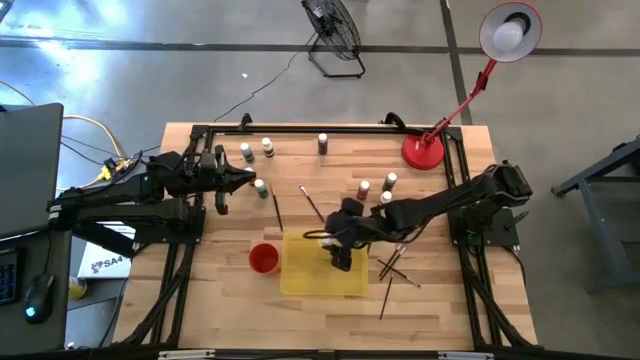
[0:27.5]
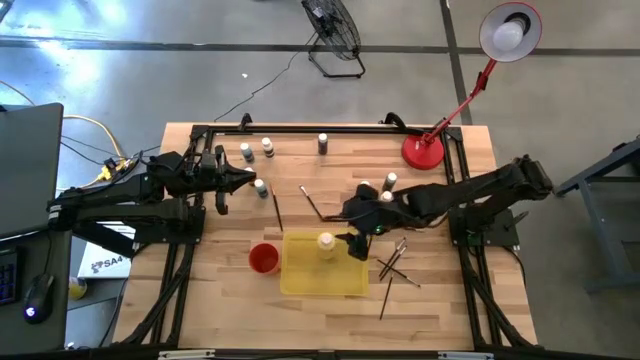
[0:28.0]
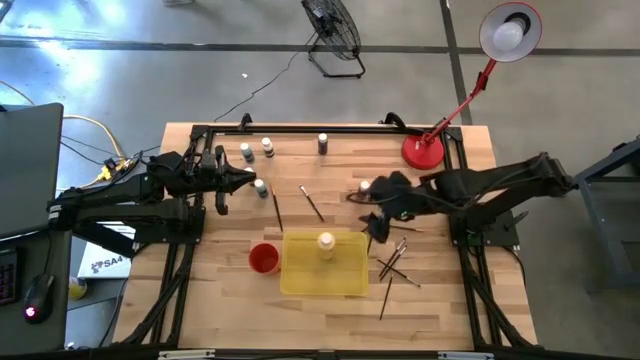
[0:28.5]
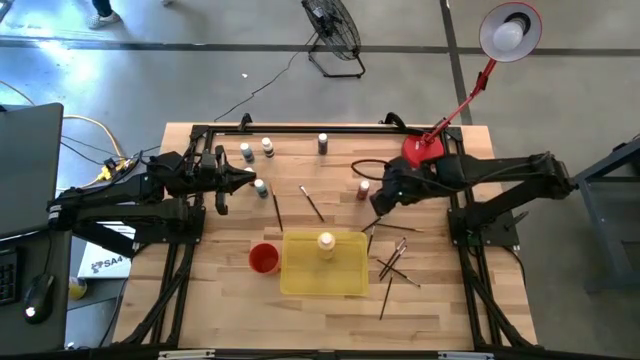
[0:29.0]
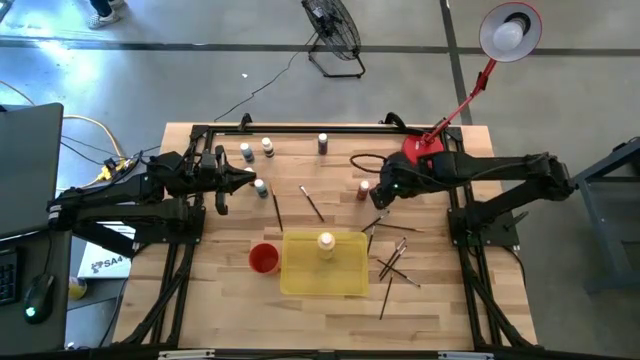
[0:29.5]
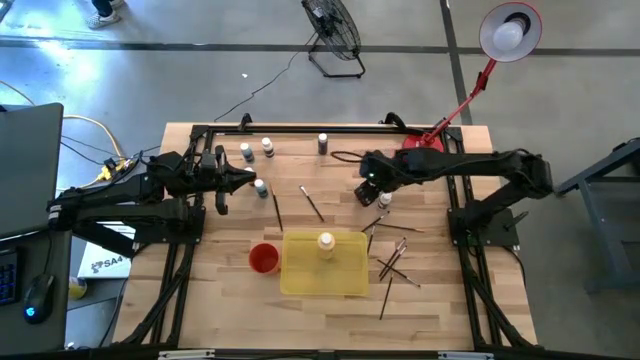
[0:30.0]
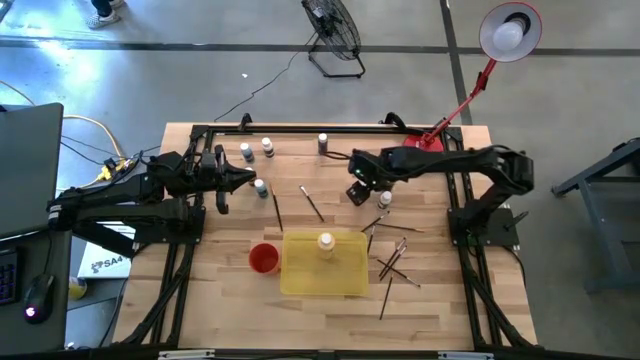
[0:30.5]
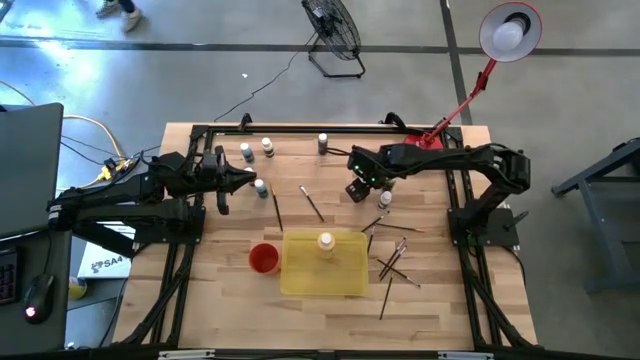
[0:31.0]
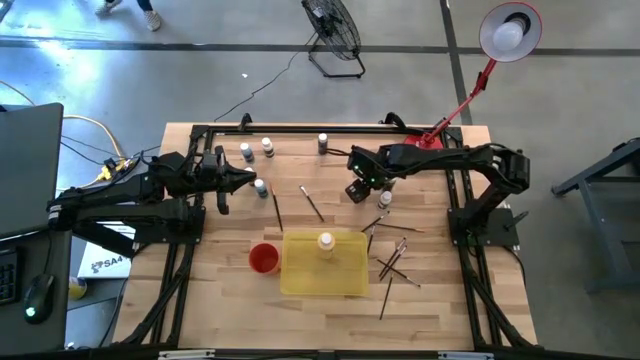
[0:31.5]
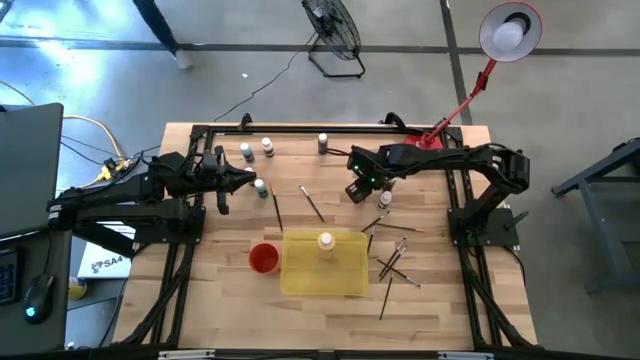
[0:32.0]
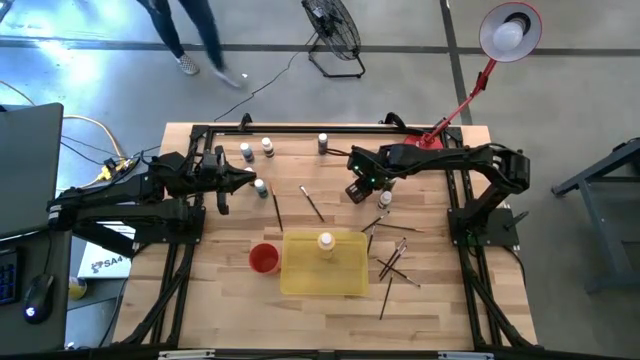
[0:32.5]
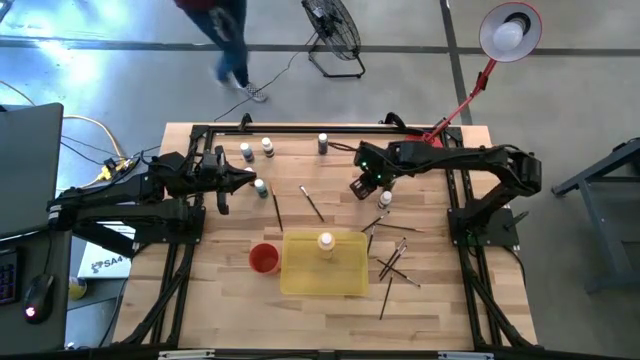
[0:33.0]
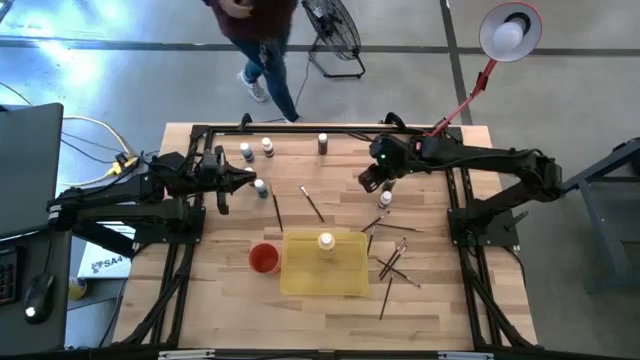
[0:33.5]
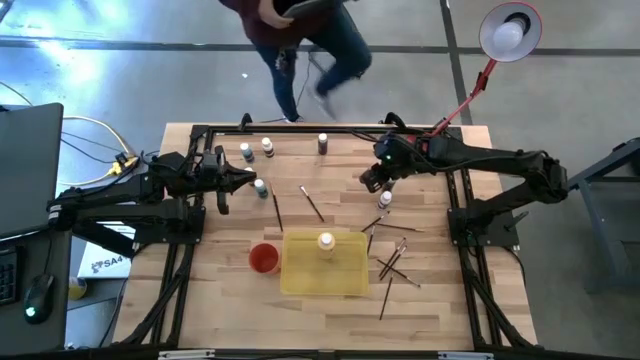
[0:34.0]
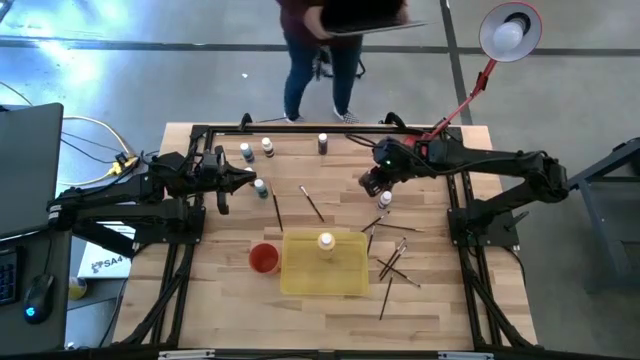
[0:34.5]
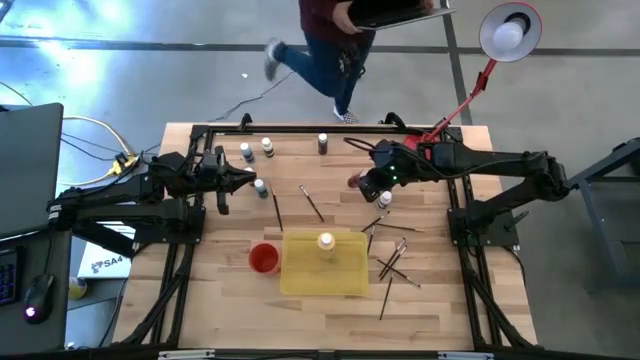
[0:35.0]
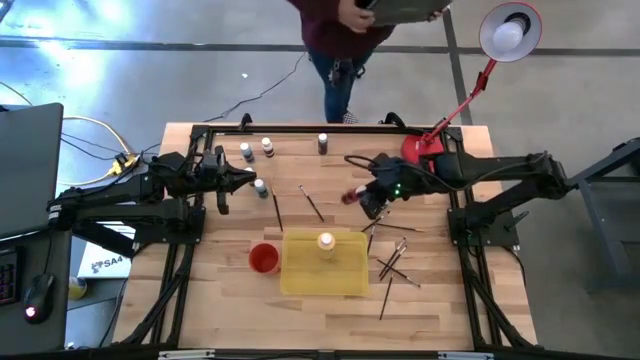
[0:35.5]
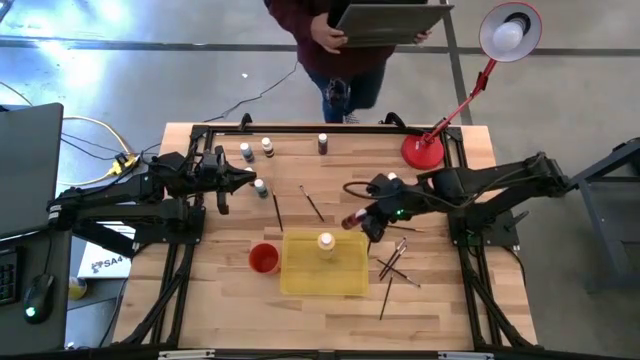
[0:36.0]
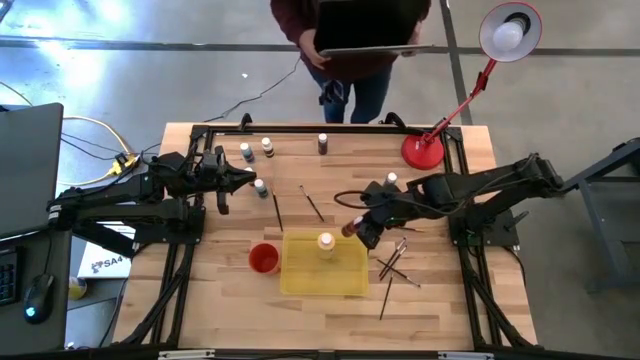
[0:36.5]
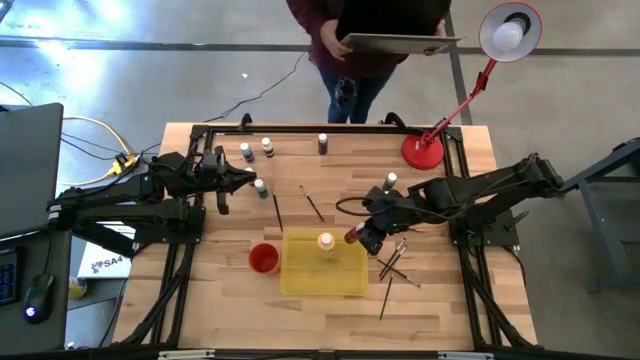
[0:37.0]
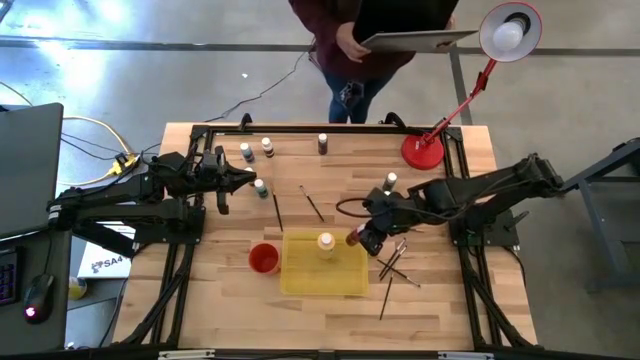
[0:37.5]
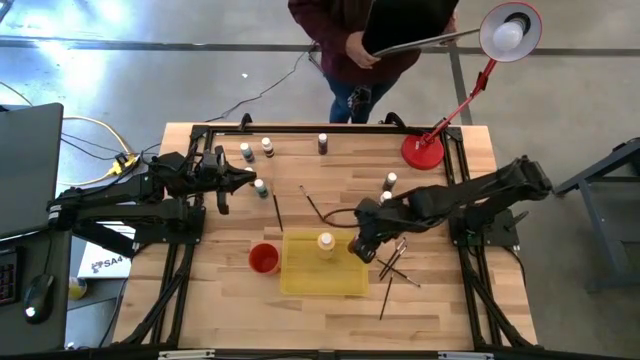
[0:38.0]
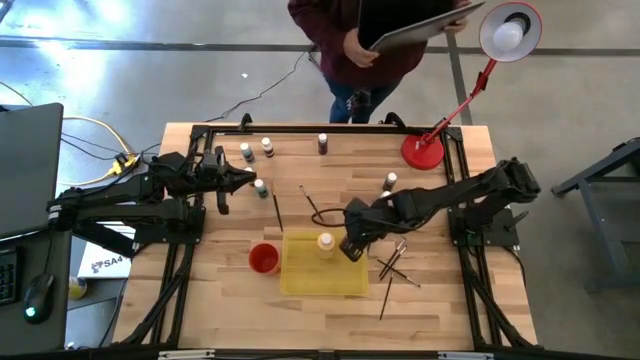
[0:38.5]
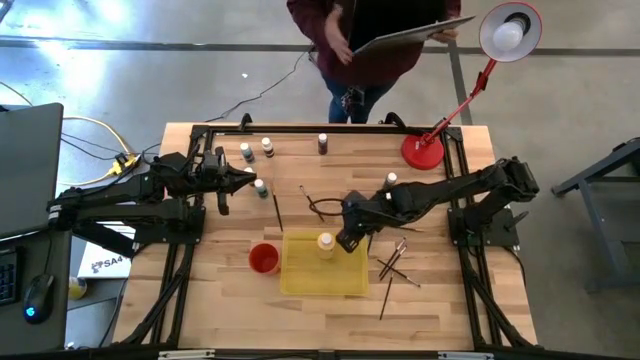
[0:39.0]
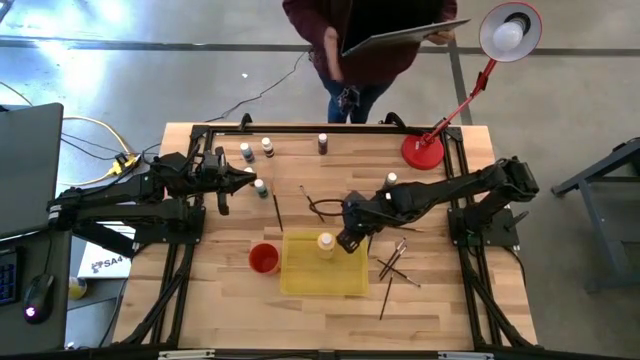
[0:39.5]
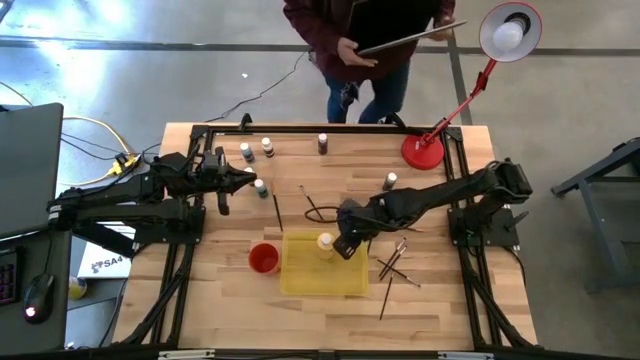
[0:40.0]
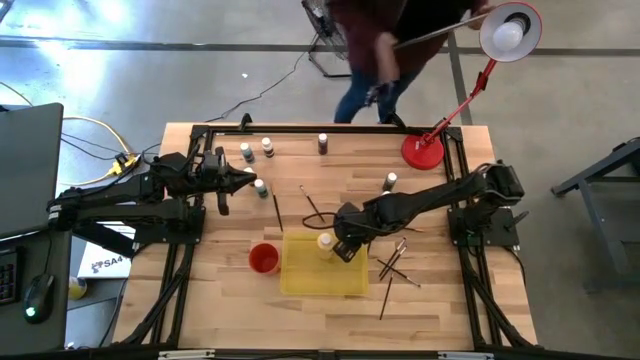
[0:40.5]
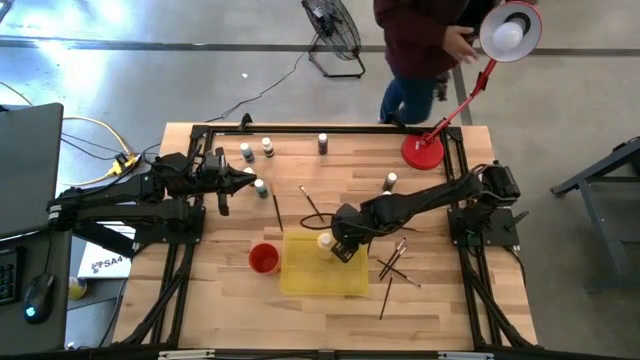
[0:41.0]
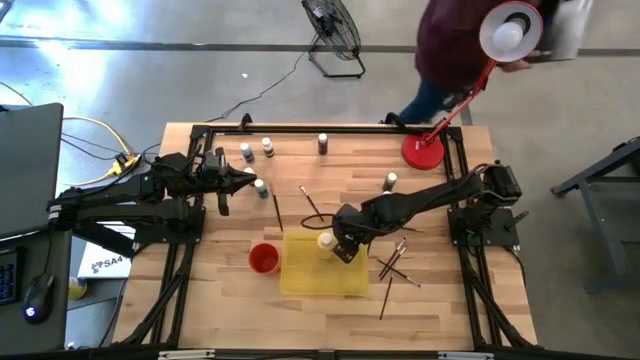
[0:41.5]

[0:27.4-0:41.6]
Task: Pick & Place Paint Supplies
Put the red paint bottle into the yellow bin

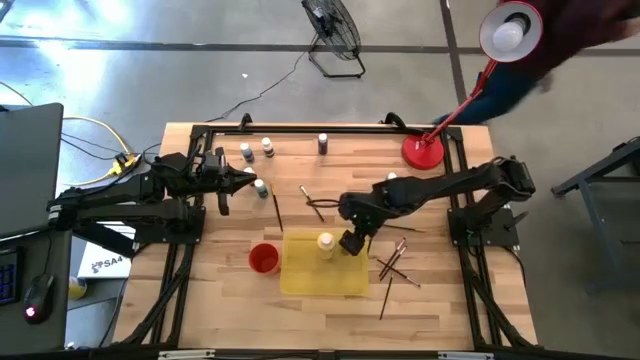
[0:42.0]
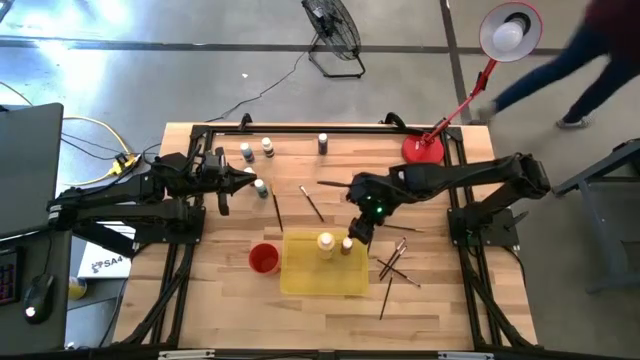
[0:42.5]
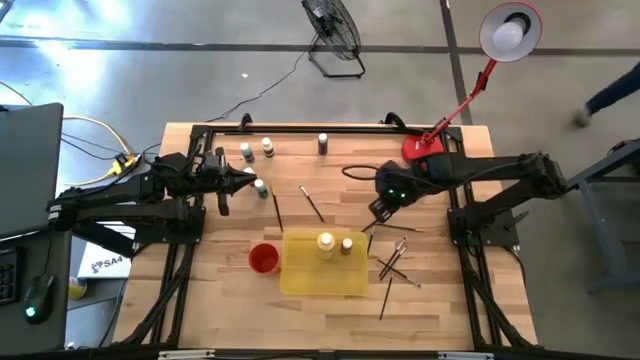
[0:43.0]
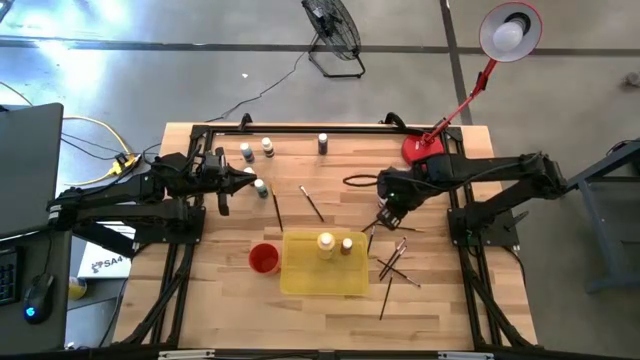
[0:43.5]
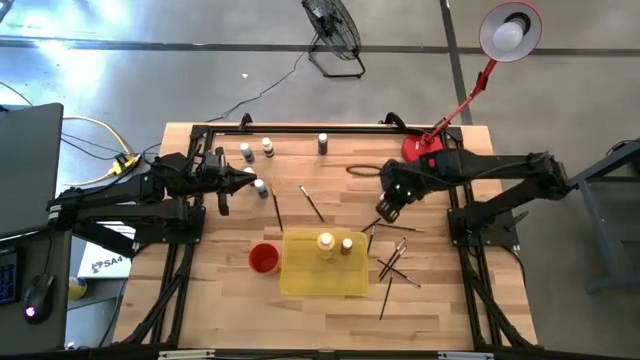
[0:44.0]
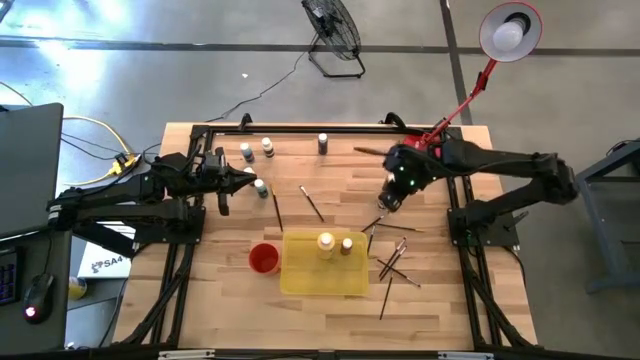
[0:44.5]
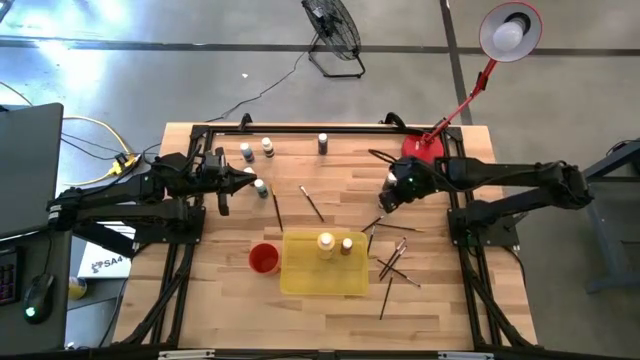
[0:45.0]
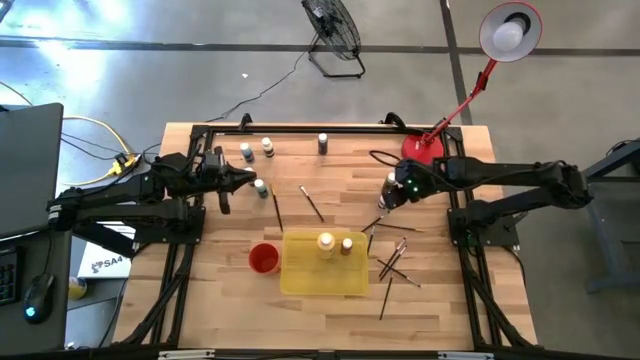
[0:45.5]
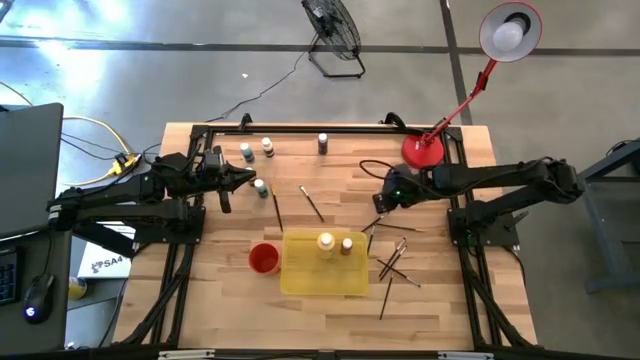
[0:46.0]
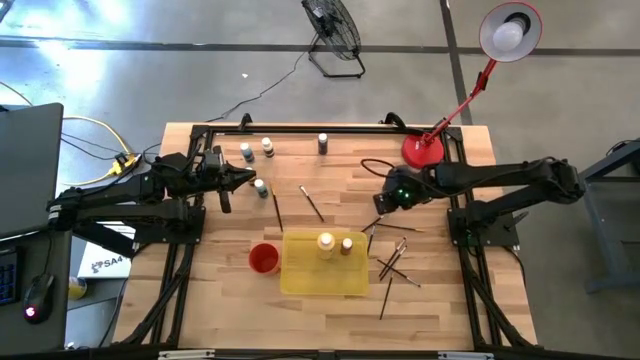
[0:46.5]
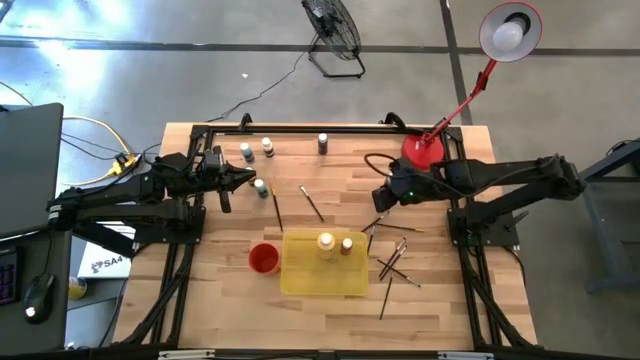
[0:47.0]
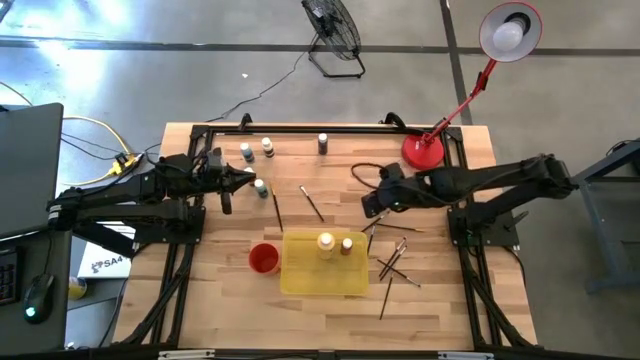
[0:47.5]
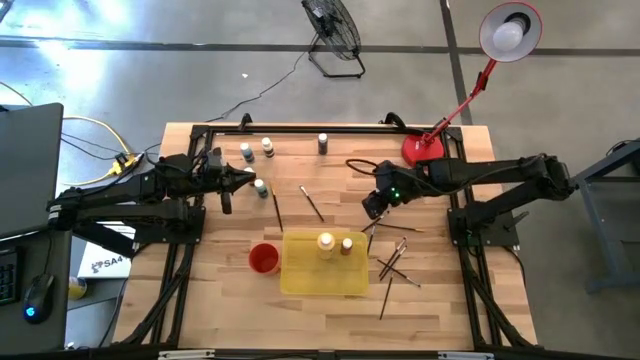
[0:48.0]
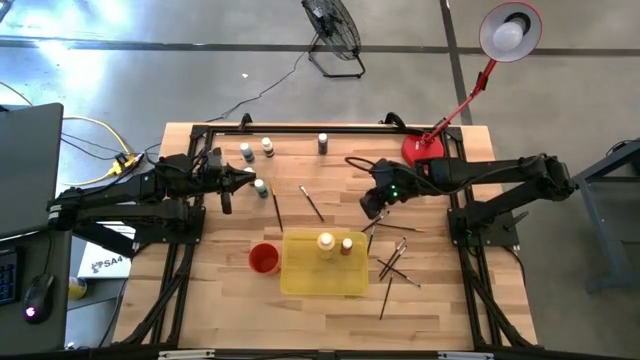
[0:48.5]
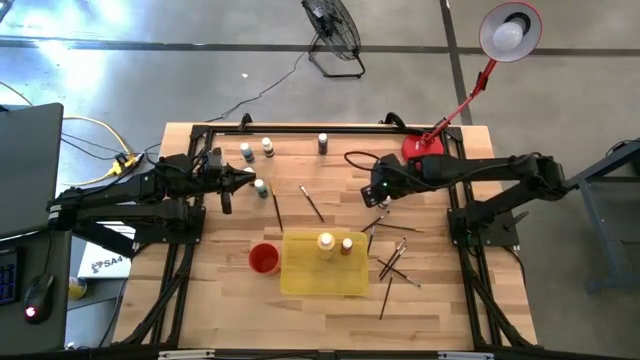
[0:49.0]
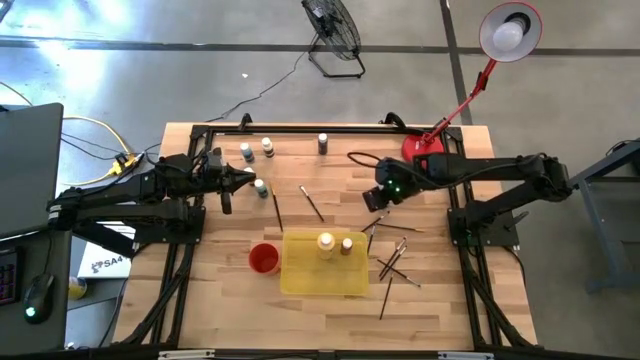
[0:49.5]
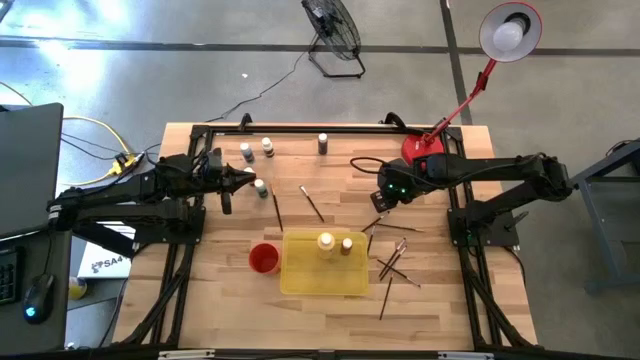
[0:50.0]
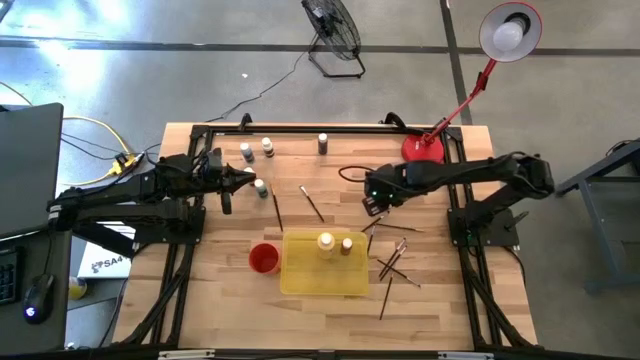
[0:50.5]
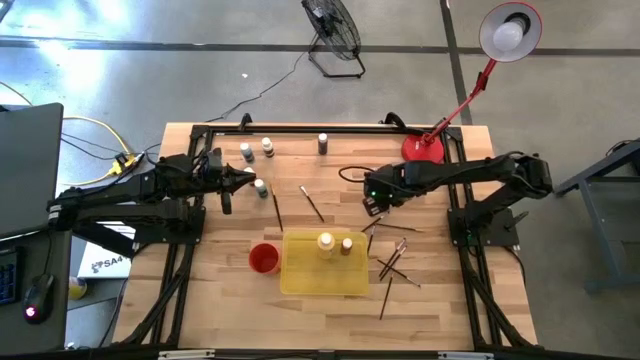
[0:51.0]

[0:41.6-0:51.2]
Put the white paint bottle into the yellow bin
